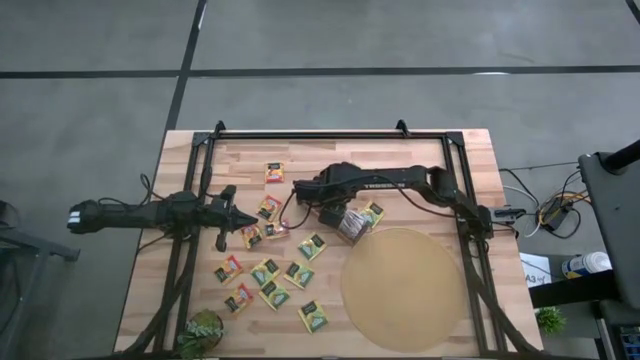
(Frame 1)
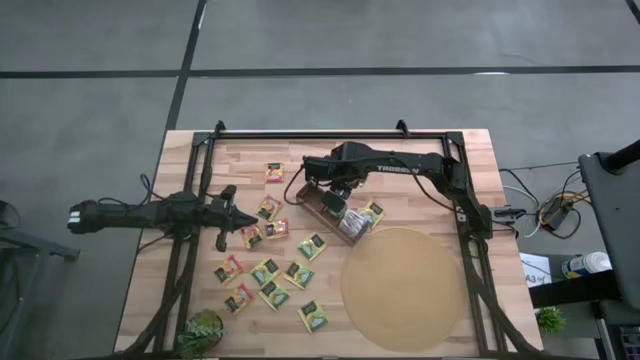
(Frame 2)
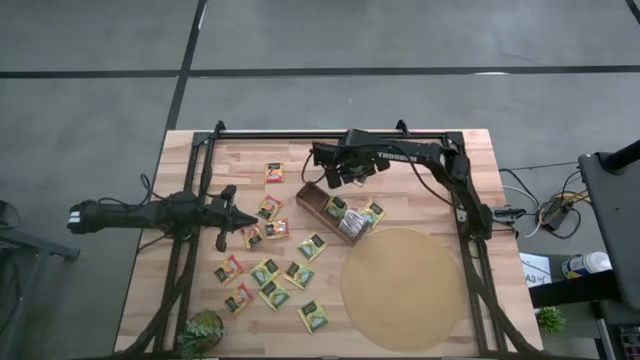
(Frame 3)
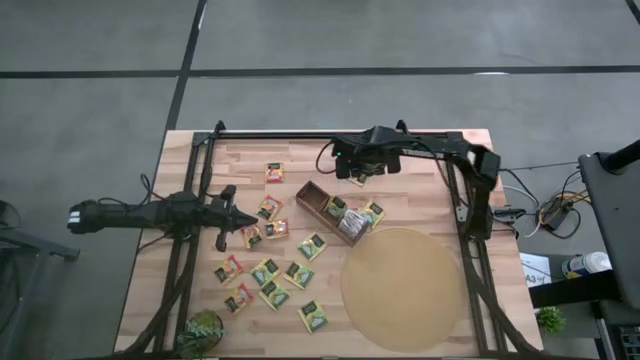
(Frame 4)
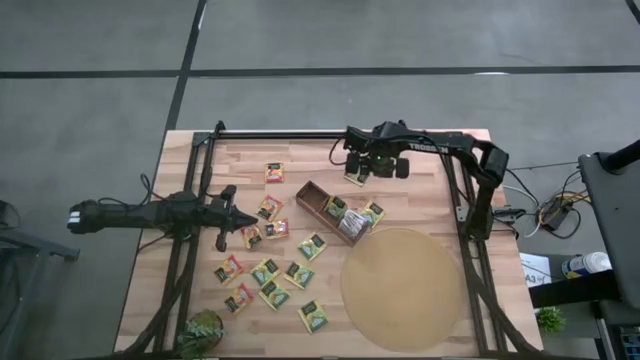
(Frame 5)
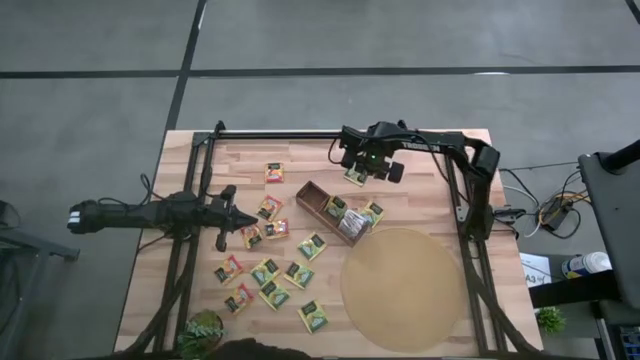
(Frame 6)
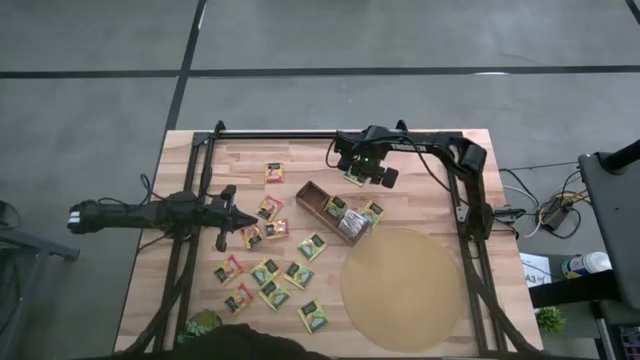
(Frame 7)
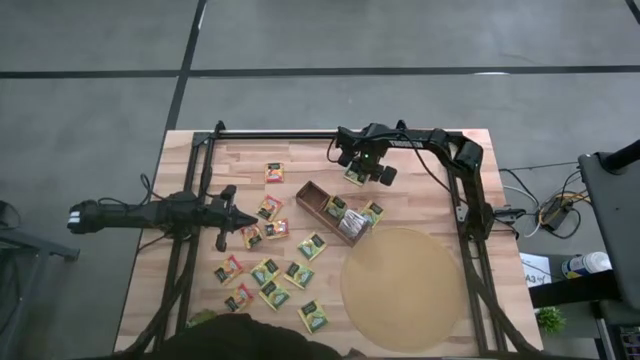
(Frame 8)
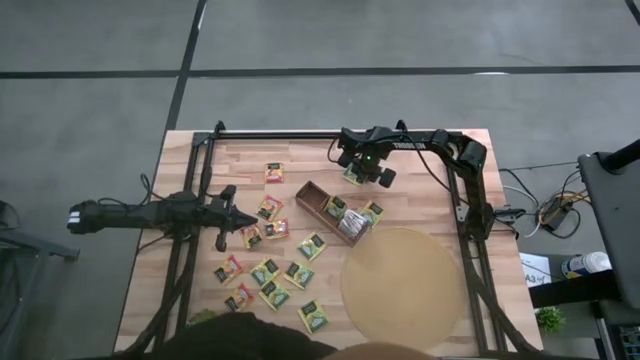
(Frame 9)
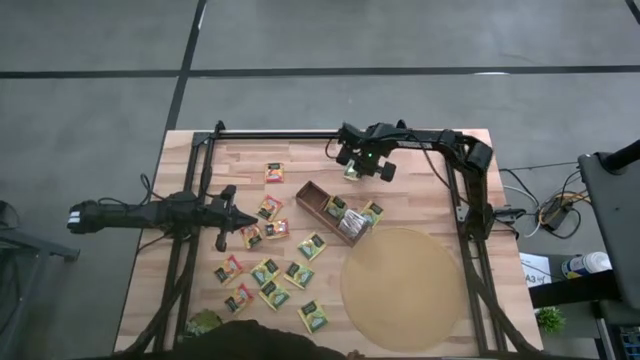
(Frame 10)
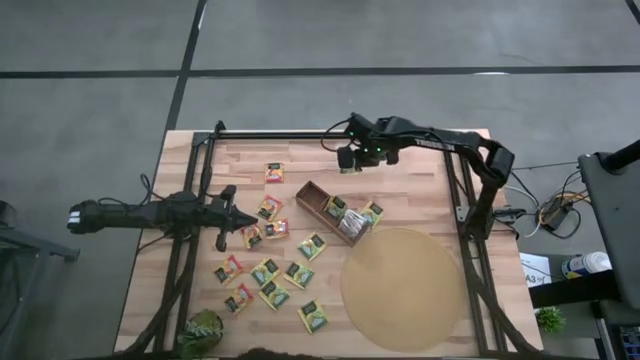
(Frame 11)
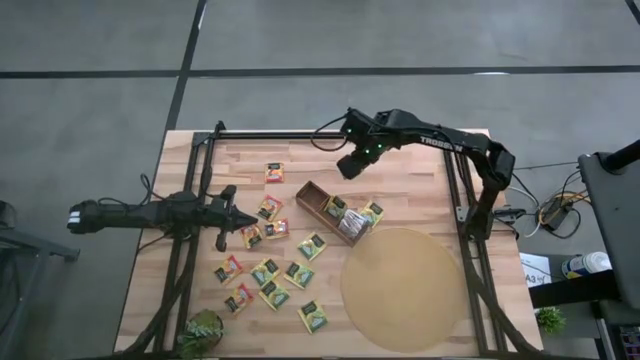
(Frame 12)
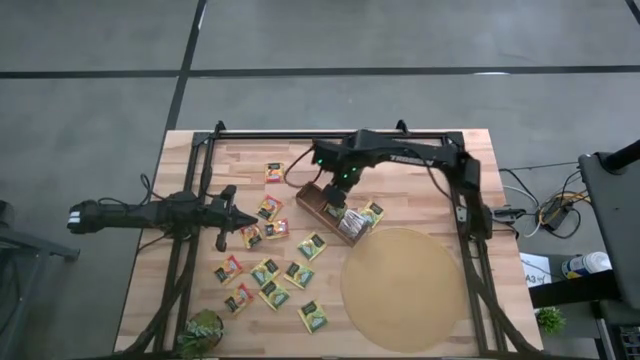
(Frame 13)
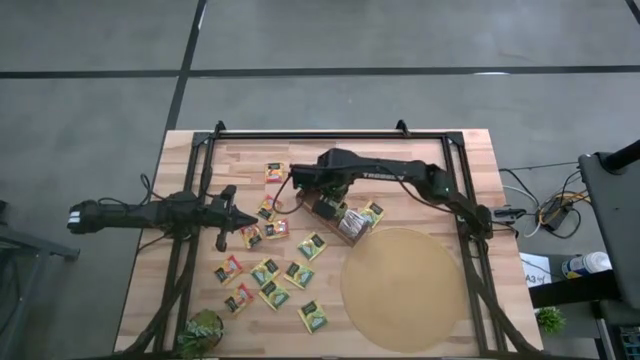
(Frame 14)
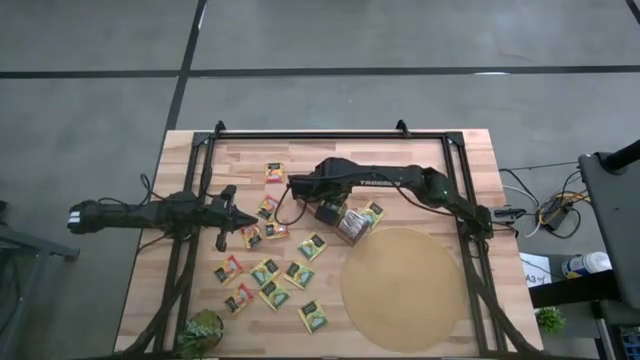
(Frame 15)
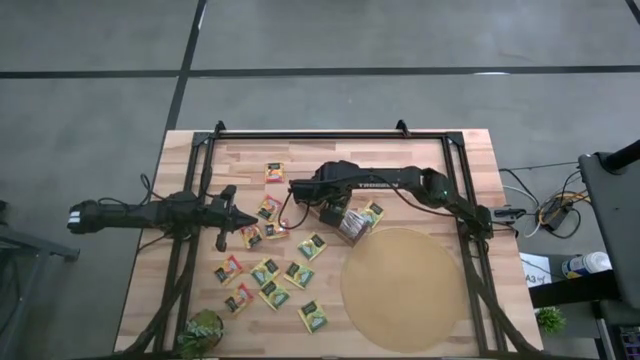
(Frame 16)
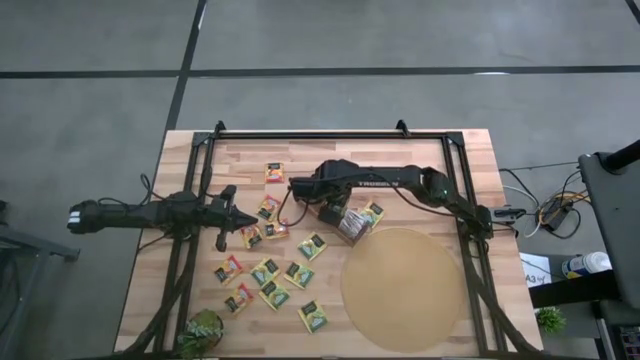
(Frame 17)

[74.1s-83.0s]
Task: Pick & Place Tea
Put the yellow tea bag into the middle section of the wooden organizer

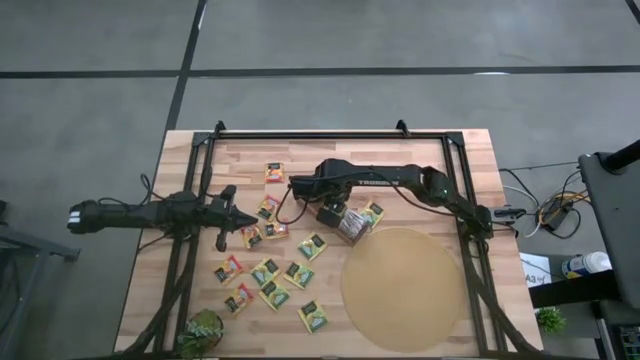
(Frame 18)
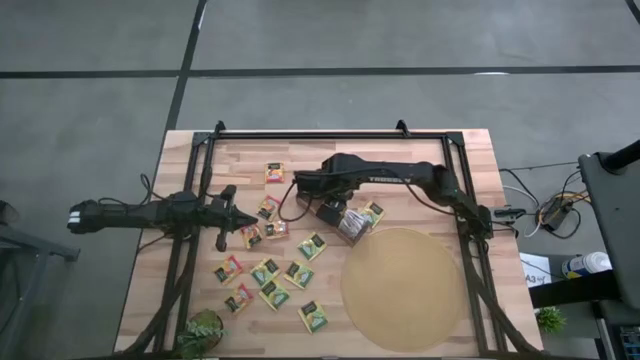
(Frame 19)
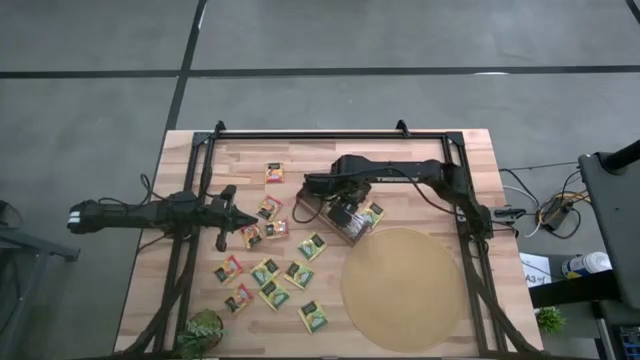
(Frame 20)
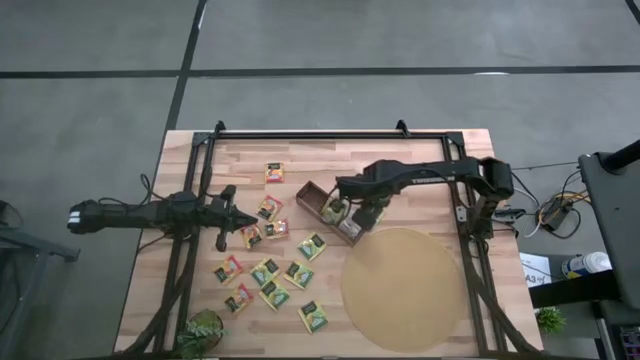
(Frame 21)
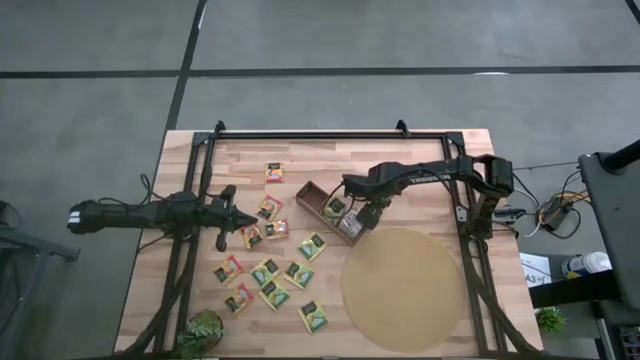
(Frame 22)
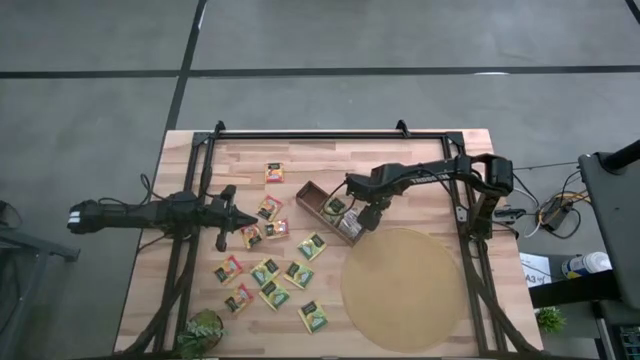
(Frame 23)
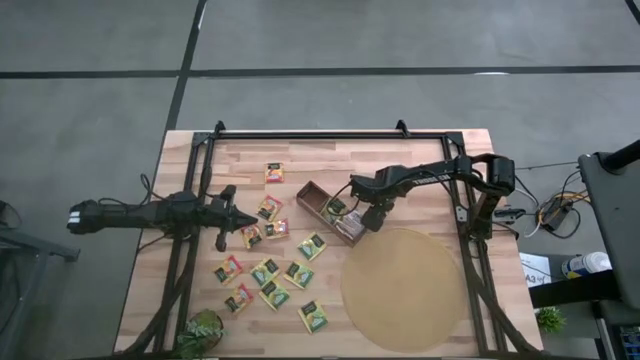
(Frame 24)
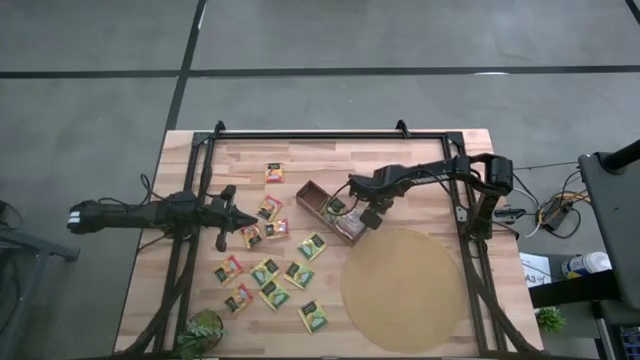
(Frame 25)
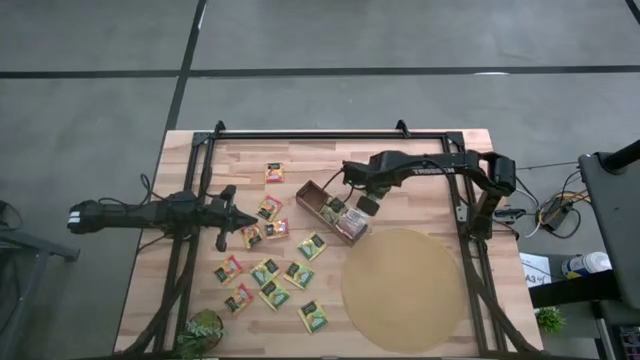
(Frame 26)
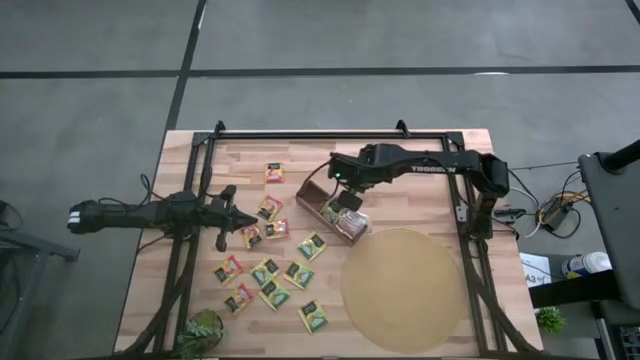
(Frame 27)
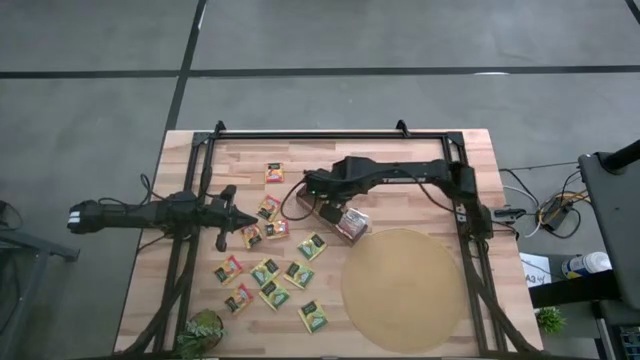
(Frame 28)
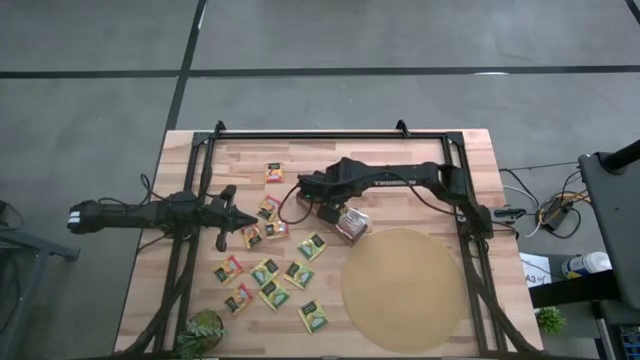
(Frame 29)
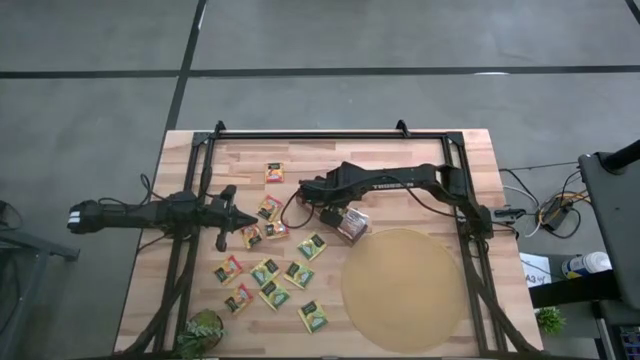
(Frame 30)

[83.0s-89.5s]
Put the yellow tea bag into the middle section of the wooden organizer

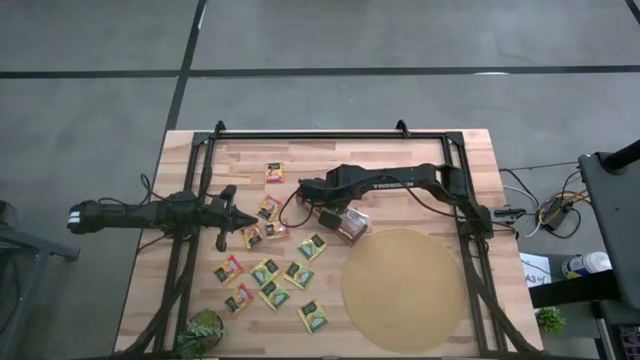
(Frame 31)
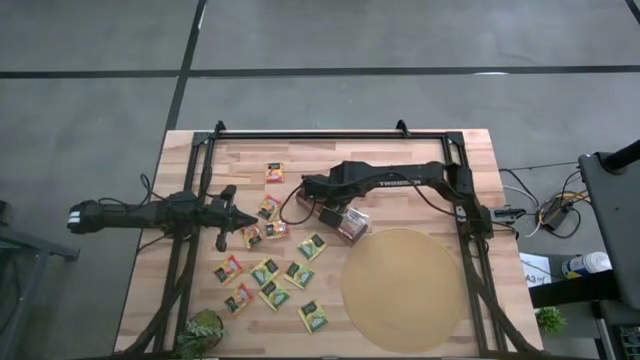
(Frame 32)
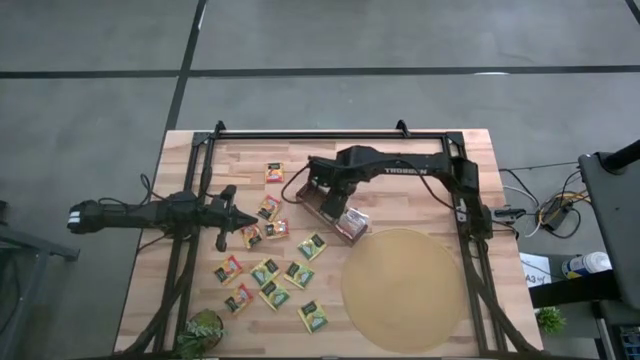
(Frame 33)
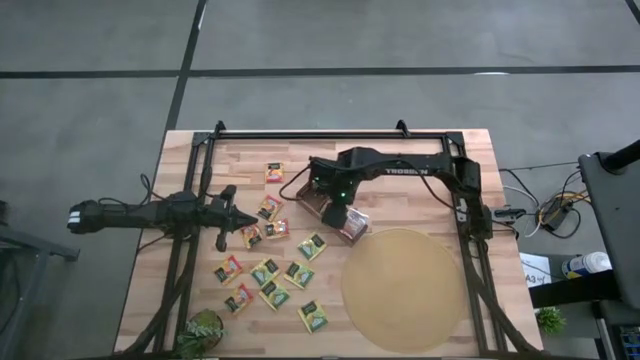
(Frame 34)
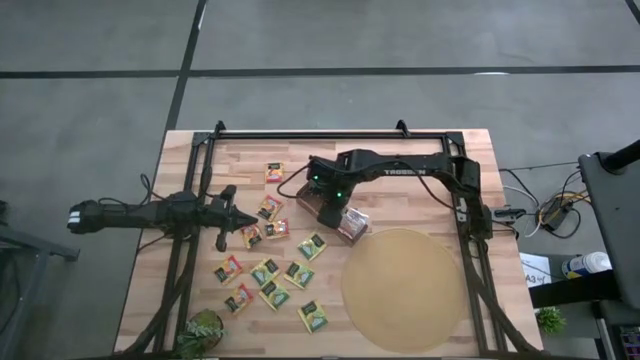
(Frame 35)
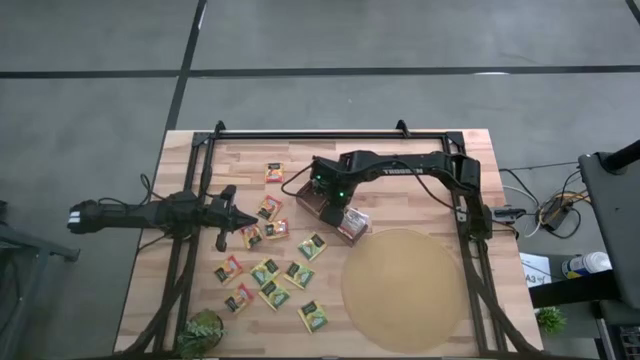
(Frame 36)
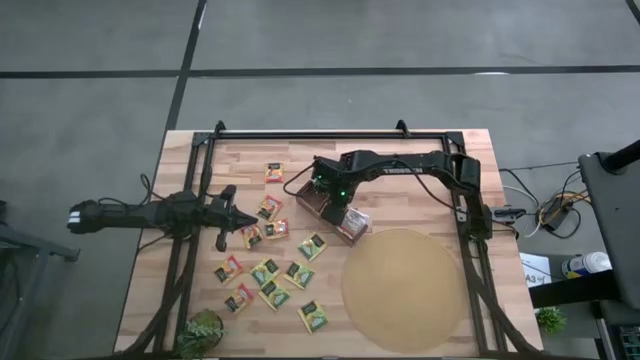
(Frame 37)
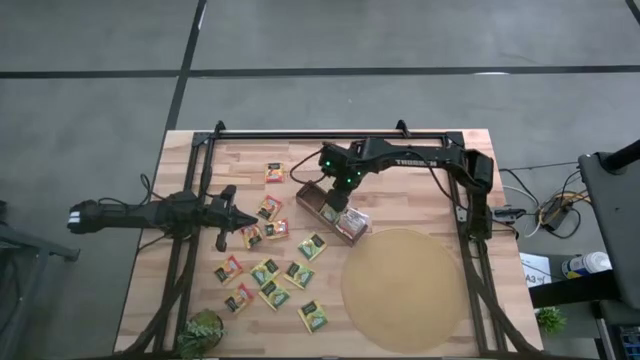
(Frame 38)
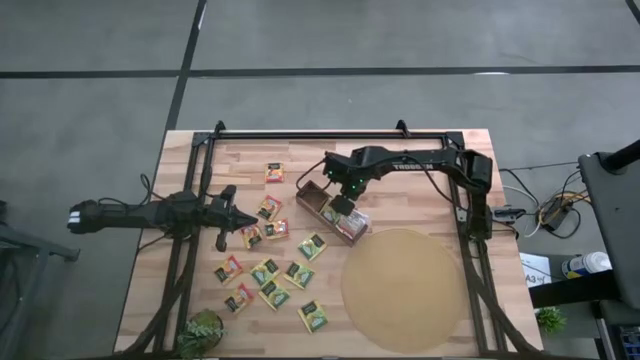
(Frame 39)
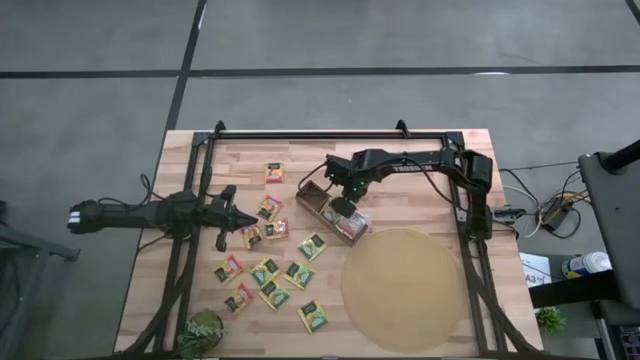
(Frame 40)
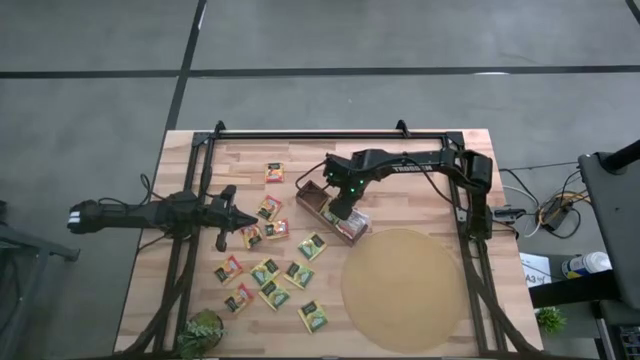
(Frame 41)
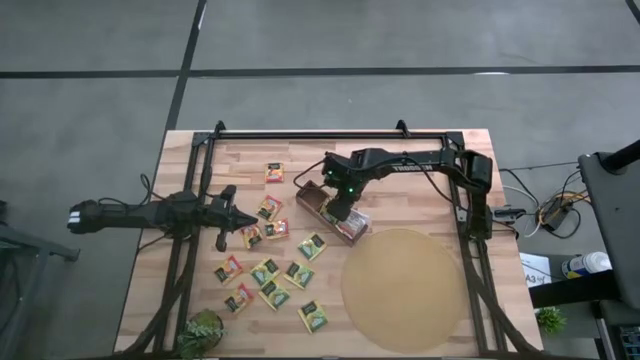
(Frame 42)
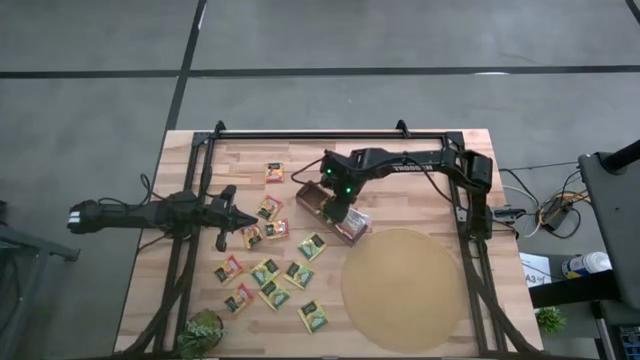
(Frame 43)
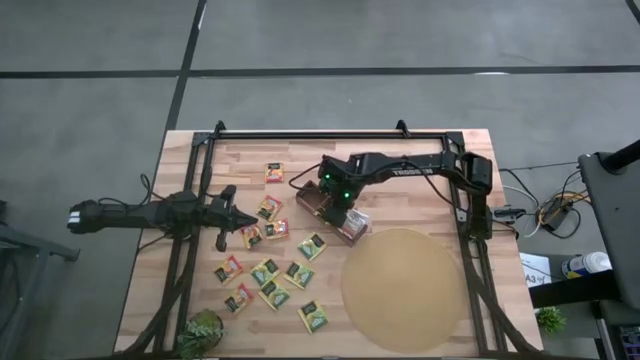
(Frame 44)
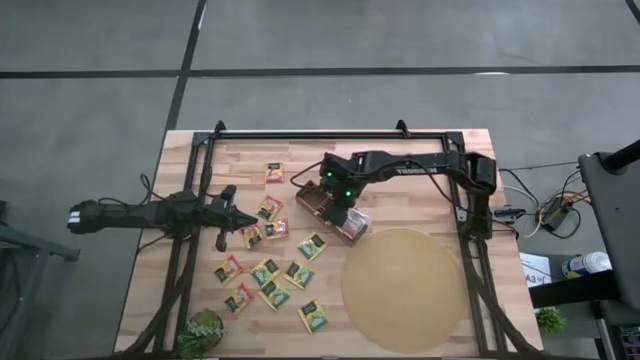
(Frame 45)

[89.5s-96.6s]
Adjust the yellow tea bags in the wooden organizer
